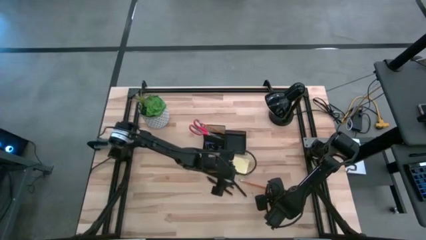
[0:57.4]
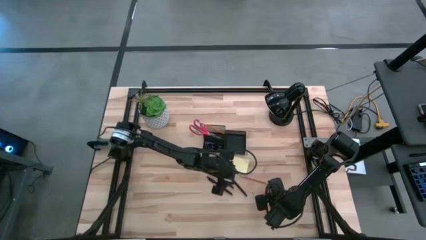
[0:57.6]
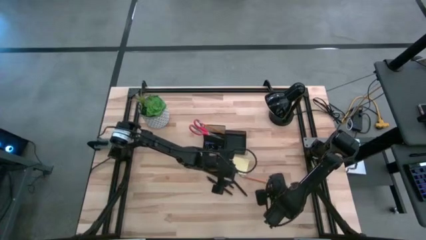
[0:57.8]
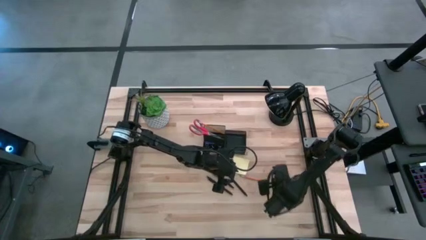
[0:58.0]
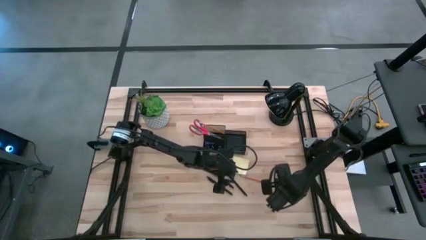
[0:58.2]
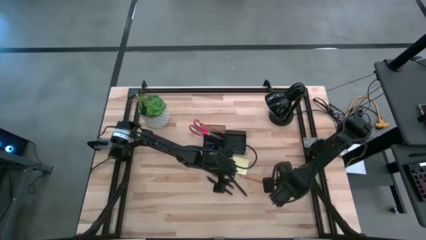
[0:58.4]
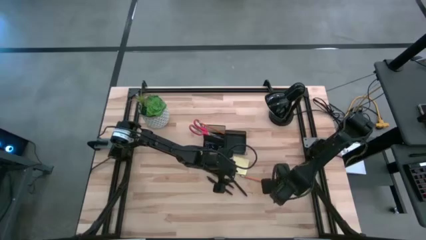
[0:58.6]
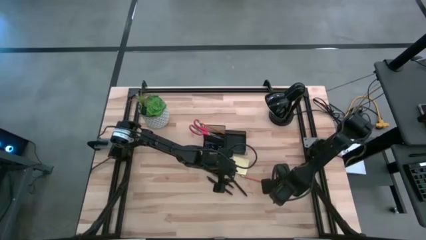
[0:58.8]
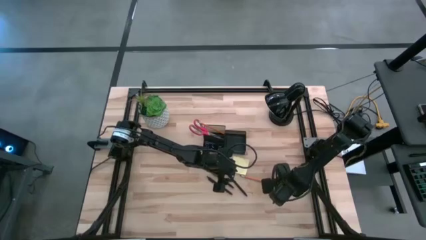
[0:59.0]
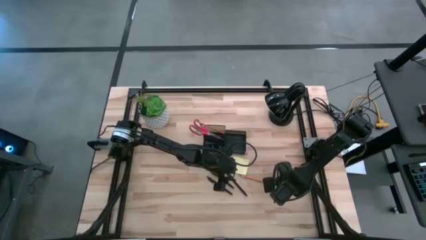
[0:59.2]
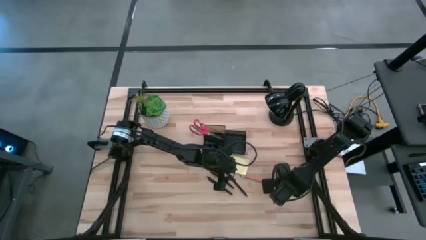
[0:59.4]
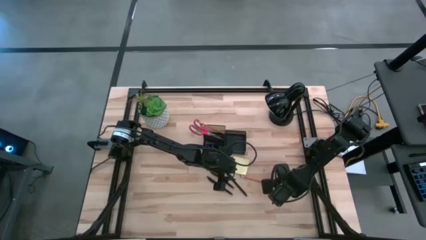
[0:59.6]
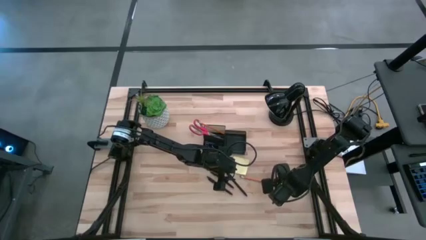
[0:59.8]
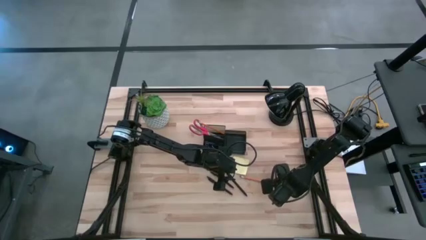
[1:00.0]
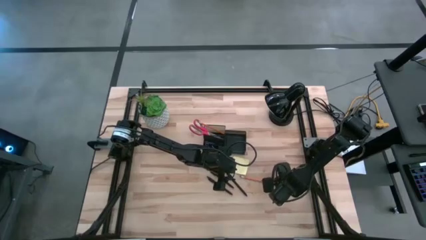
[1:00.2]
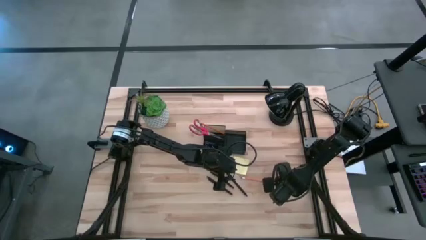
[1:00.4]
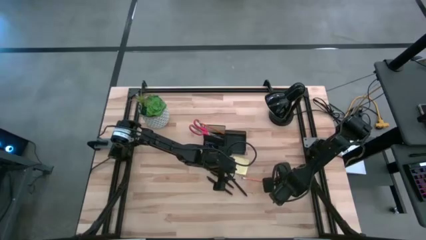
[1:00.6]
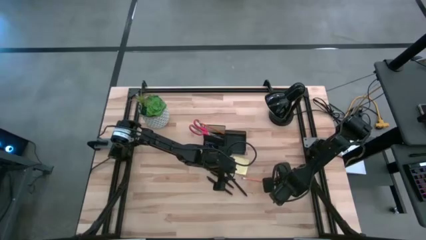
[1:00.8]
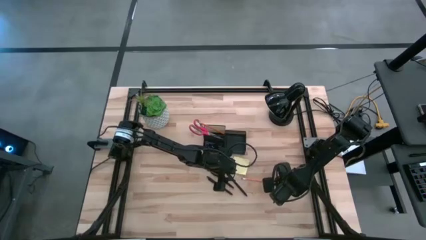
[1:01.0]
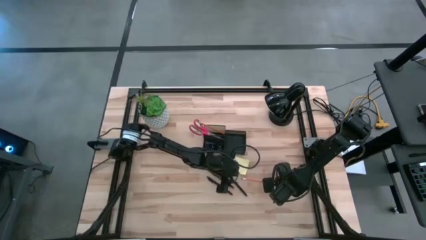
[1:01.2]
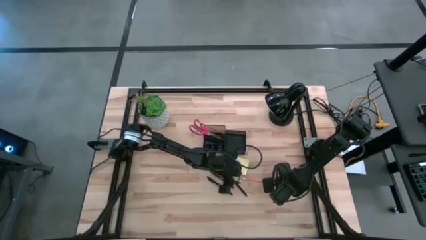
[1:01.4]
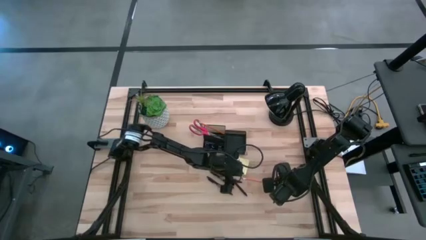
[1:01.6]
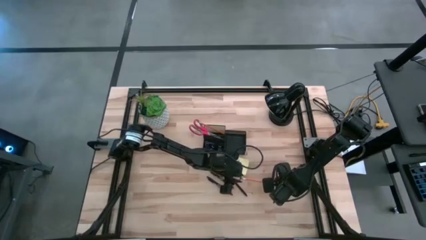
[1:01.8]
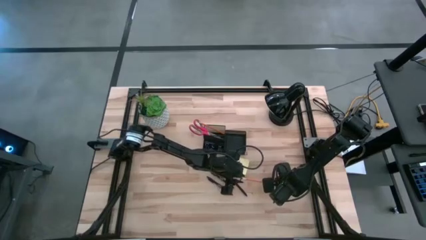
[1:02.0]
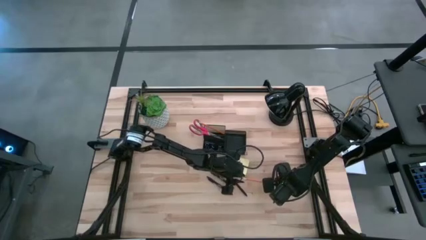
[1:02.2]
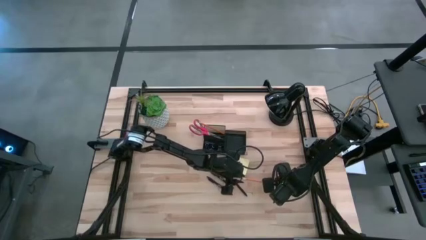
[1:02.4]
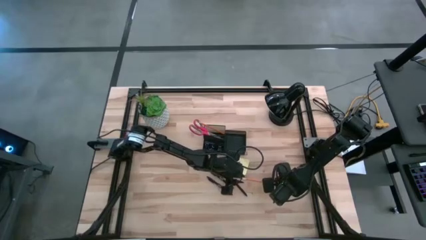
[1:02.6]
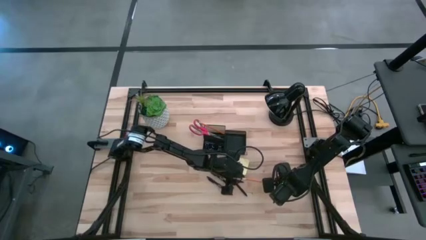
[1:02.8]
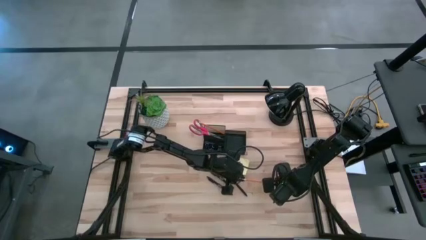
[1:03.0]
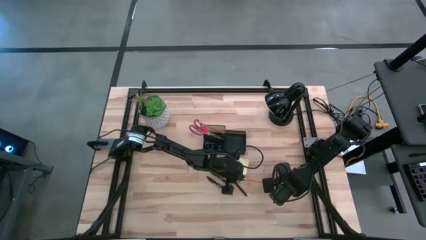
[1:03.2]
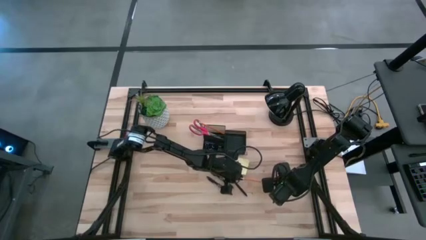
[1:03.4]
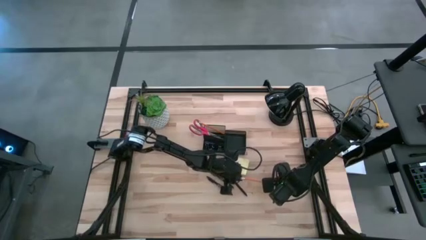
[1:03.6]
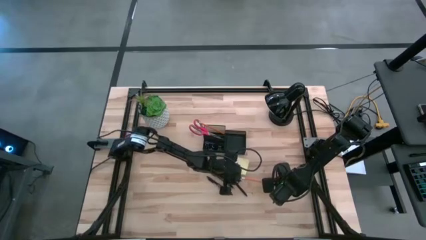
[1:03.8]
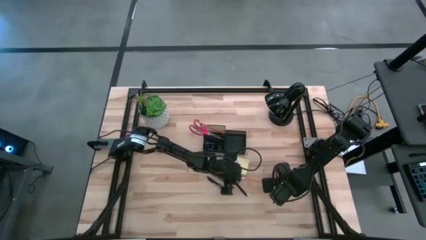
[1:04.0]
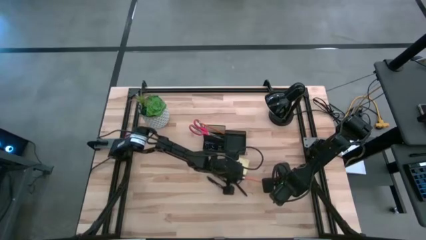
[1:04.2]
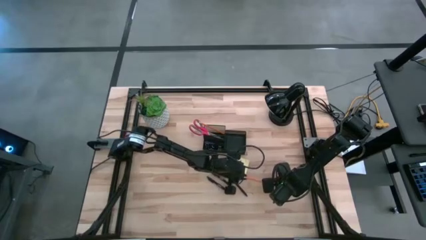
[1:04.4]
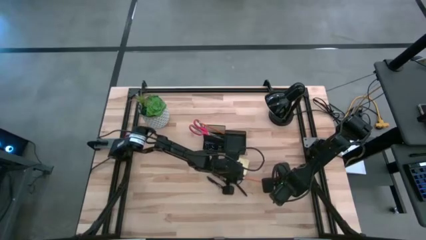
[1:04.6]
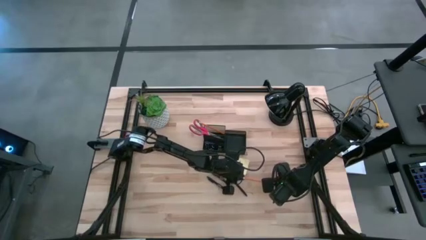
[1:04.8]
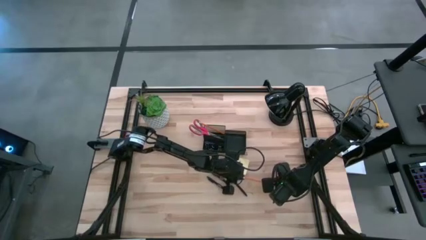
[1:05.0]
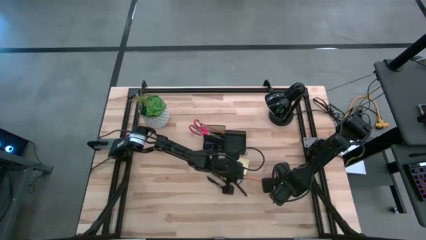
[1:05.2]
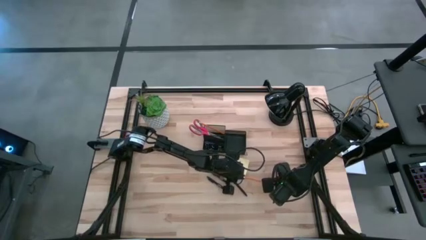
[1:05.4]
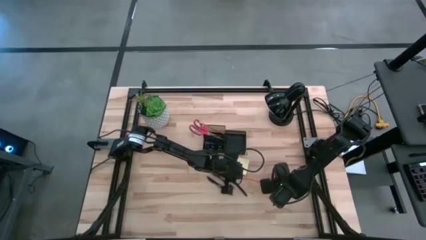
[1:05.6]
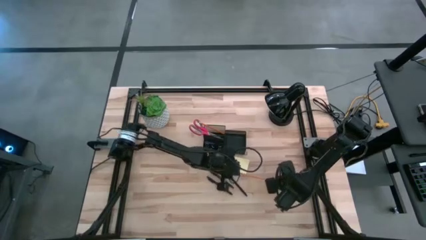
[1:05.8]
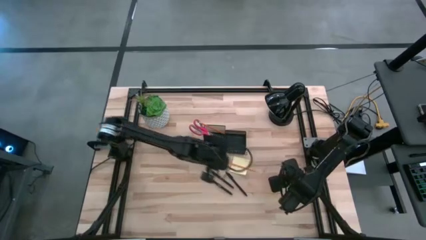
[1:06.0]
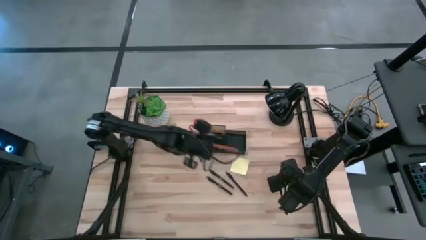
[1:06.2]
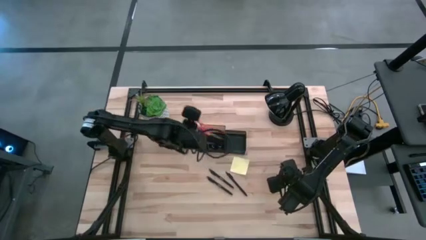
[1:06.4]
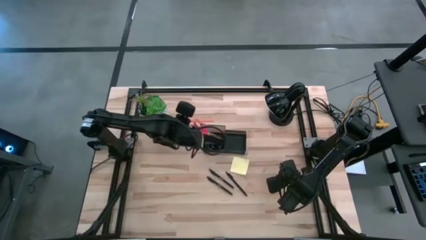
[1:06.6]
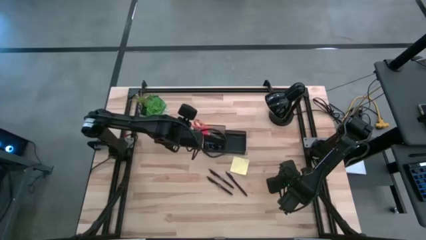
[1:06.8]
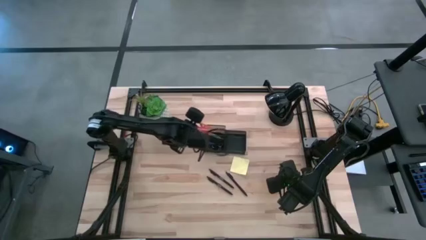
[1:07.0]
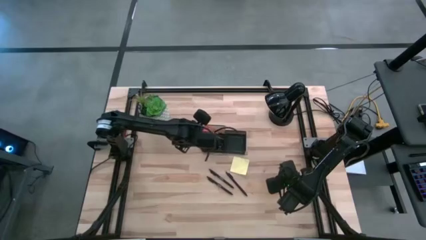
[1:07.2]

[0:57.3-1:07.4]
Task: Pick and place office supplies into organizer
Put the yellow pencil into the black desk organizer

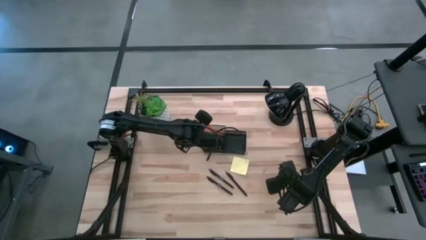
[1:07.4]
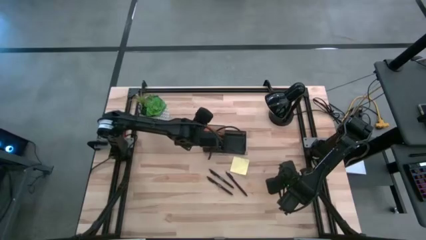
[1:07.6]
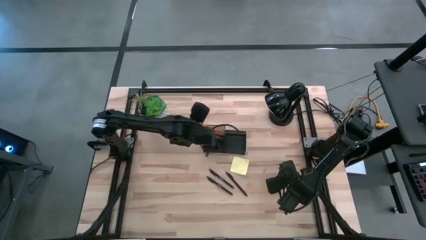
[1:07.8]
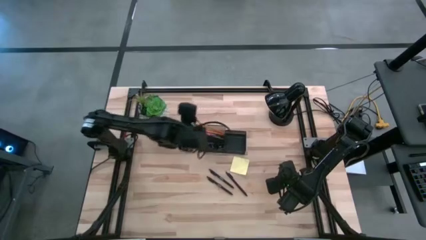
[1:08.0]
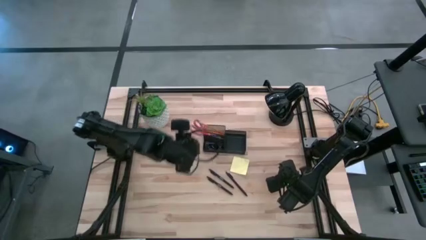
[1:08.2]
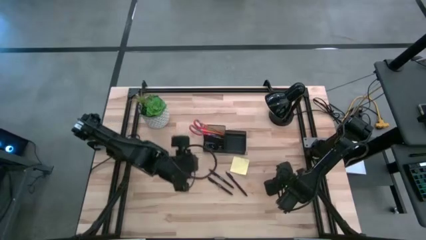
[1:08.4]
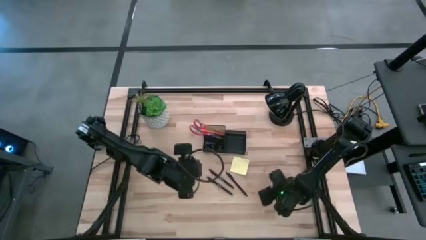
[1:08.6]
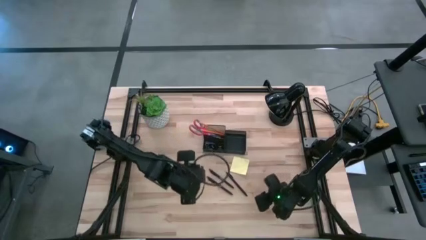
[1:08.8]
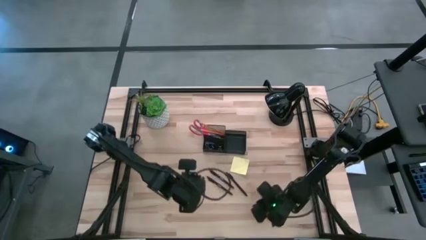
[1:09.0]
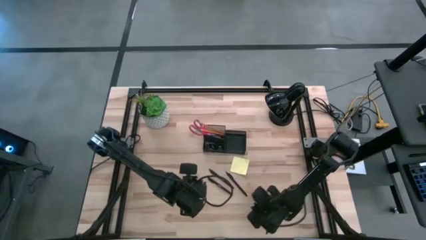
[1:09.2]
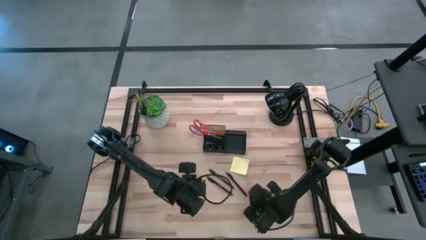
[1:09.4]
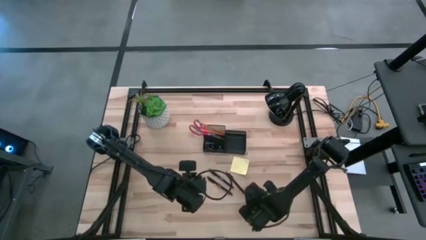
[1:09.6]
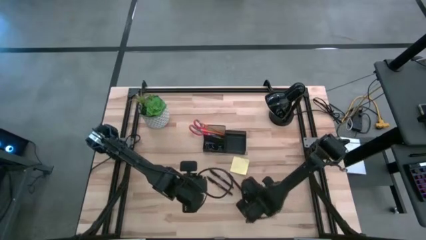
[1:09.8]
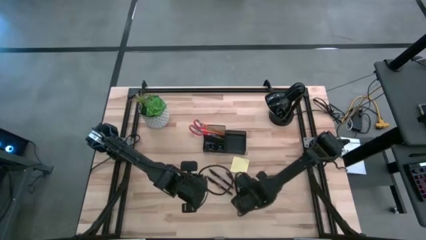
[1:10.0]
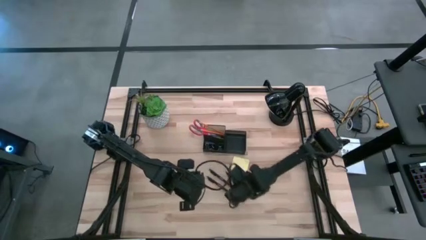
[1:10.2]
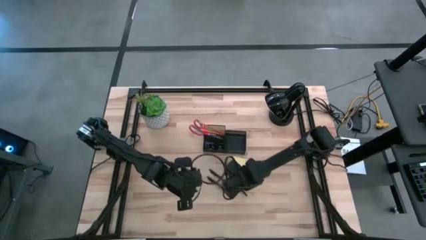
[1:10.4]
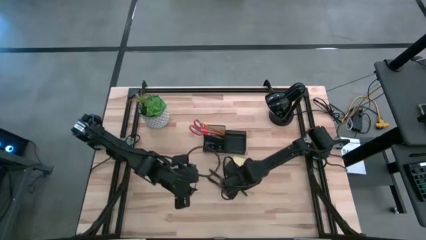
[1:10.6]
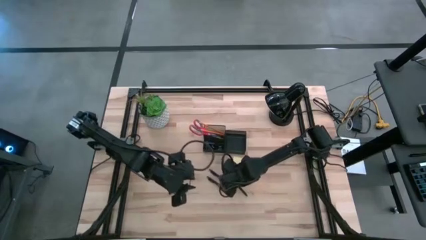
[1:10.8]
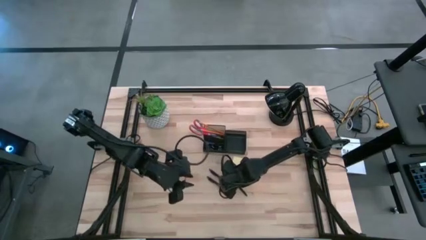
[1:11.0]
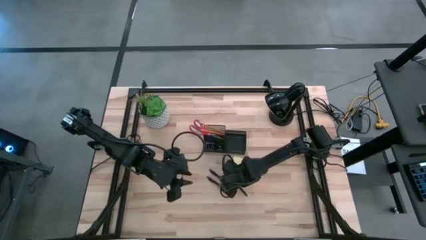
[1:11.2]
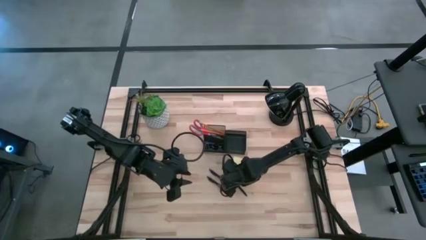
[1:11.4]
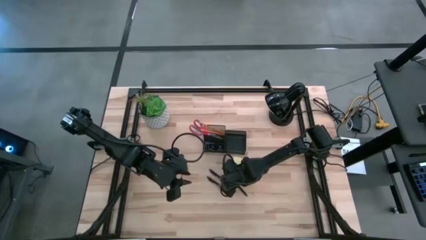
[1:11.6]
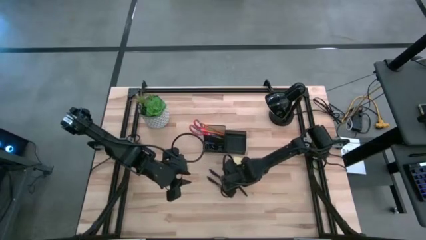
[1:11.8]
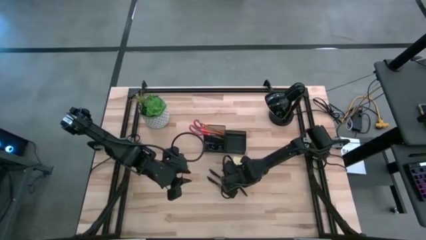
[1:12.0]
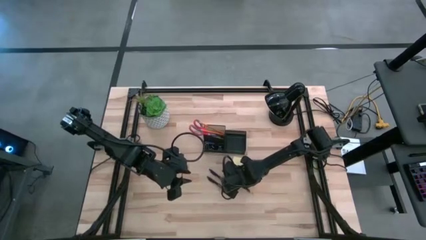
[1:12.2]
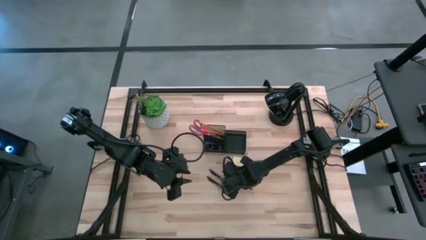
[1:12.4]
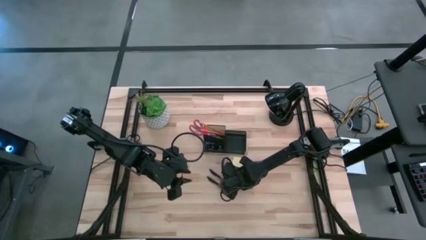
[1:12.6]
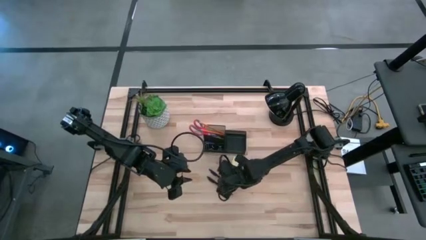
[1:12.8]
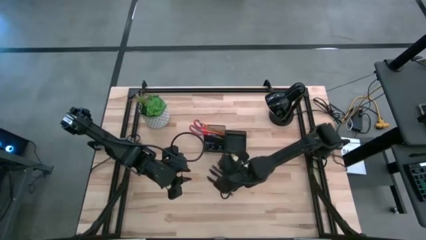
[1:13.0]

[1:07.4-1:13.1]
Put the right black pen into the black desk organizer

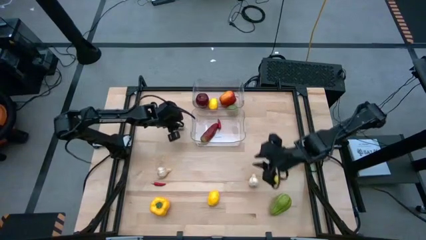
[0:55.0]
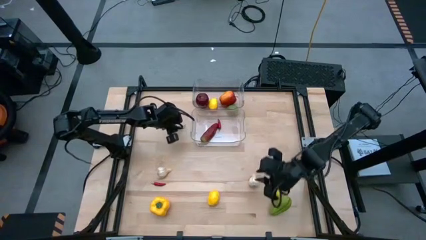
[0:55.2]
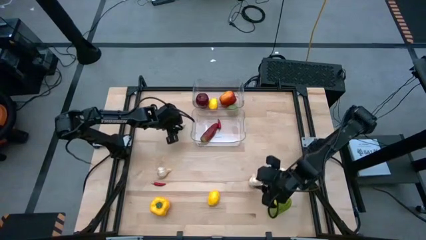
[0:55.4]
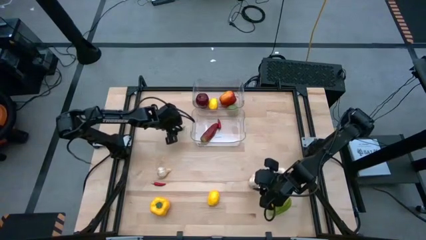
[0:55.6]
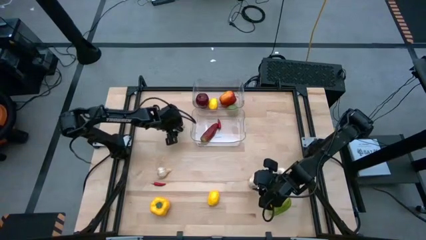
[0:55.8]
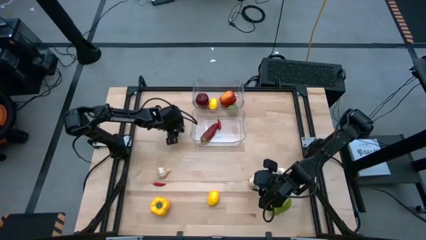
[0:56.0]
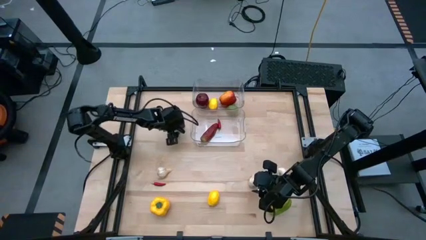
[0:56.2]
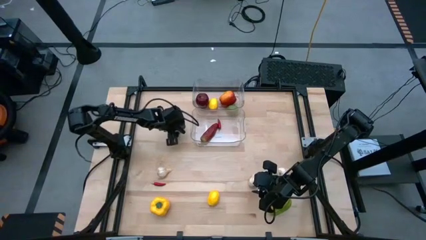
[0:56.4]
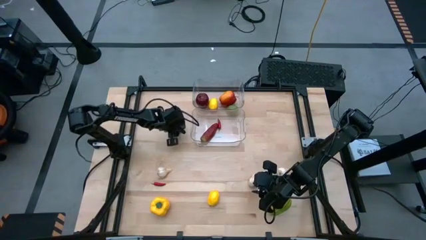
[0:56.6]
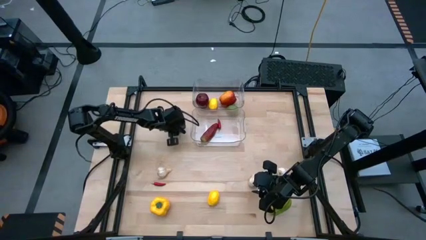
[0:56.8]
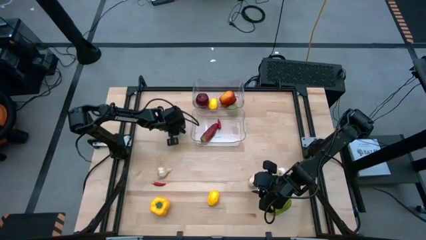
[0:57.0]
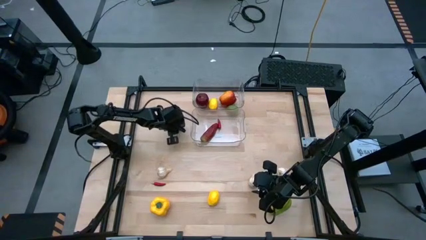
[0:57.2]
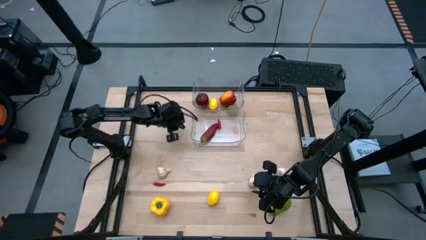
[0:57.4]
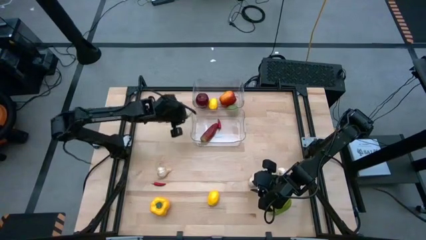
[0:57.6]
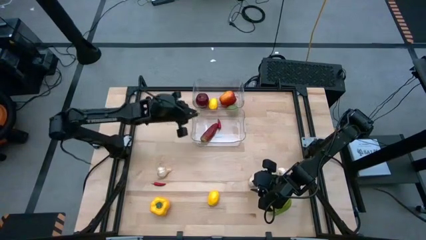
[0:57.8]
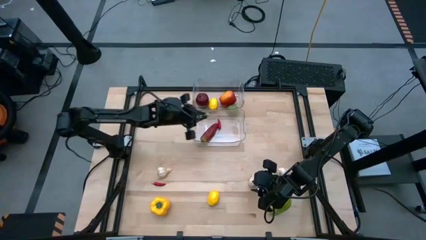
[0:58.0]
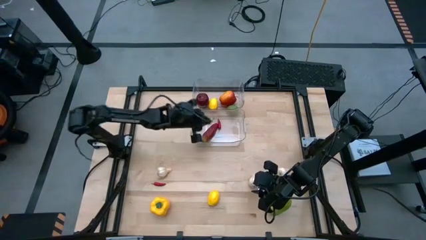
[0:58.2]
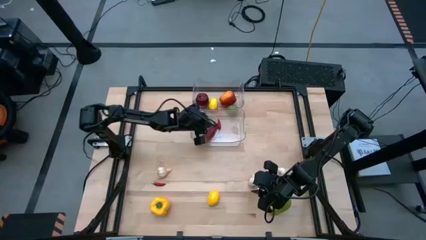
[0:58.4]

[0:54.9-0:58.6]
Task: Sort produce into baskets
Put the green chili pepper into the bottom transparent bin
